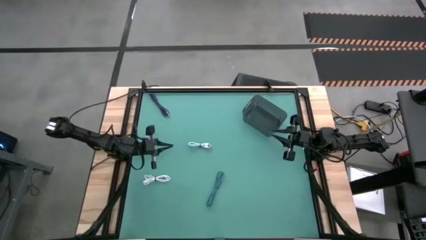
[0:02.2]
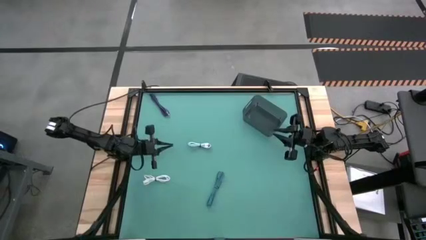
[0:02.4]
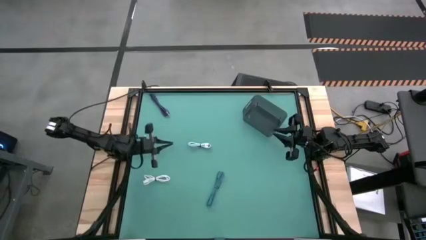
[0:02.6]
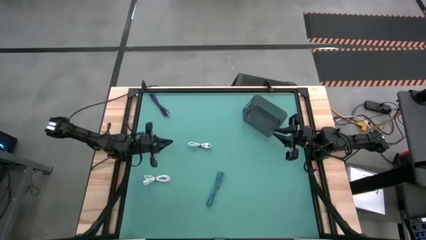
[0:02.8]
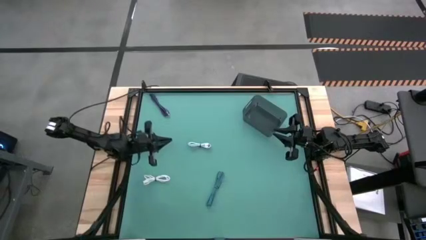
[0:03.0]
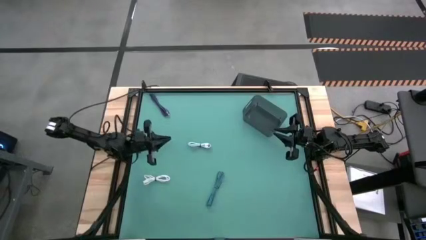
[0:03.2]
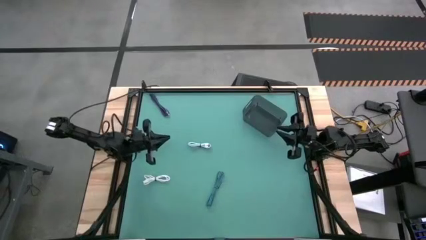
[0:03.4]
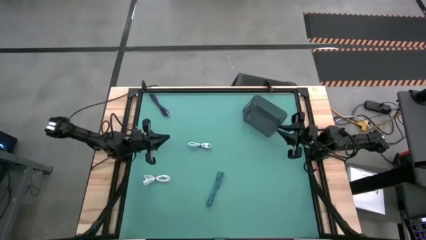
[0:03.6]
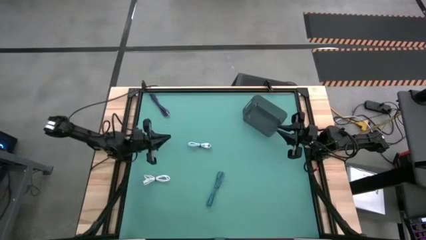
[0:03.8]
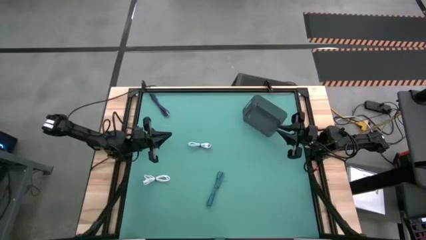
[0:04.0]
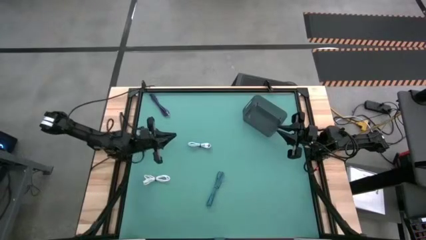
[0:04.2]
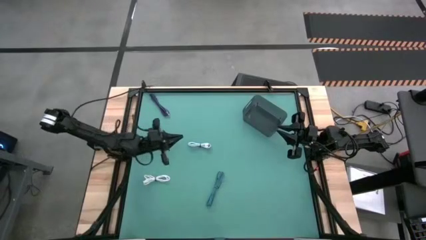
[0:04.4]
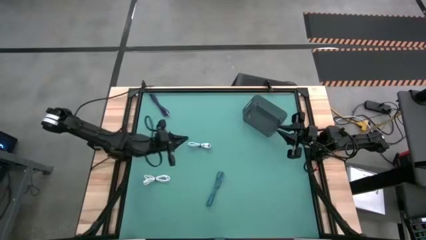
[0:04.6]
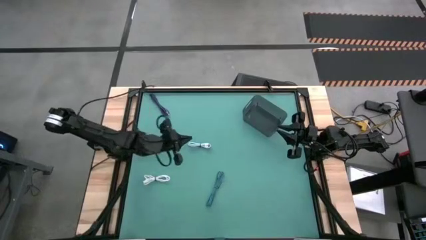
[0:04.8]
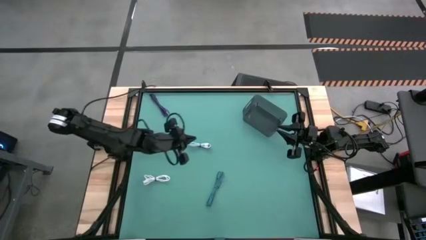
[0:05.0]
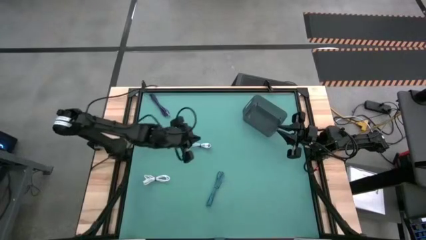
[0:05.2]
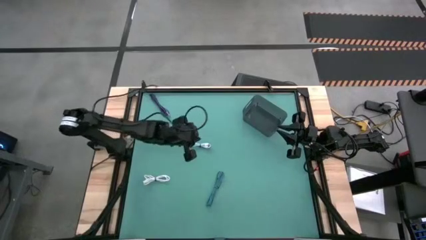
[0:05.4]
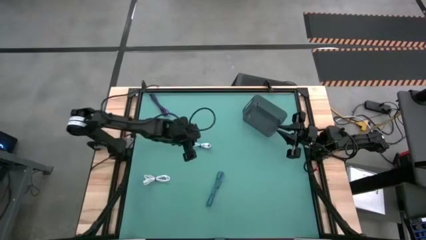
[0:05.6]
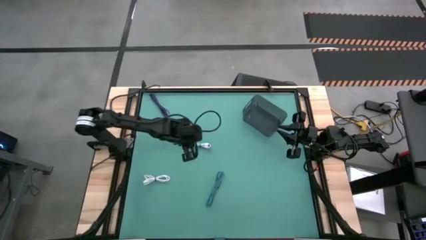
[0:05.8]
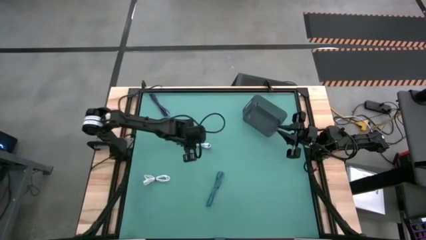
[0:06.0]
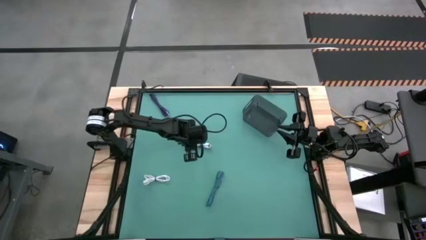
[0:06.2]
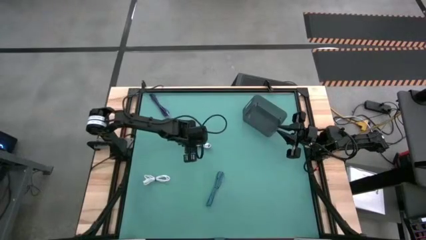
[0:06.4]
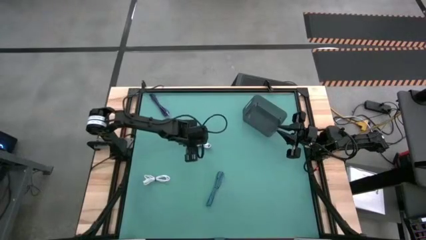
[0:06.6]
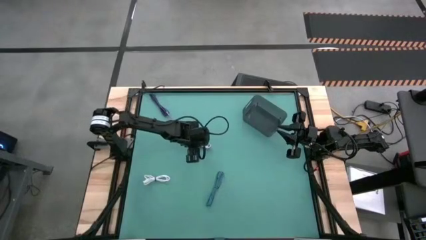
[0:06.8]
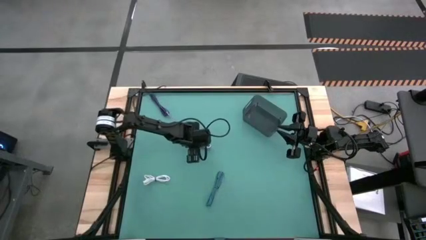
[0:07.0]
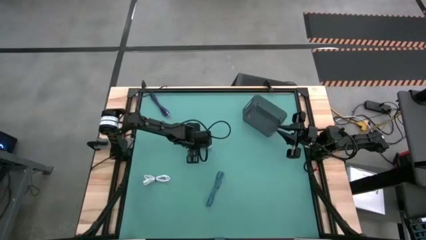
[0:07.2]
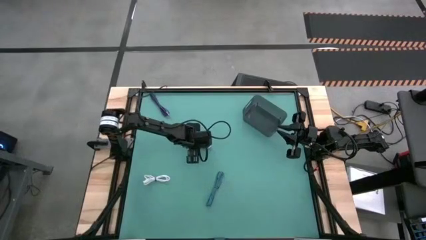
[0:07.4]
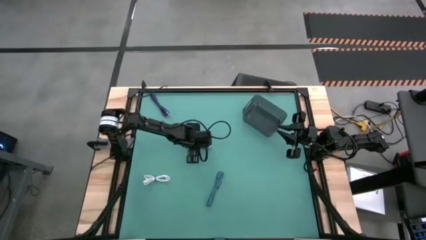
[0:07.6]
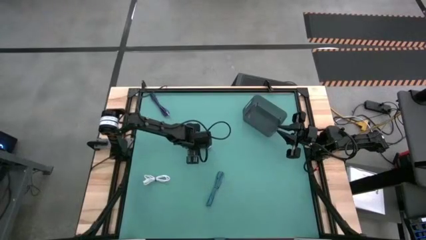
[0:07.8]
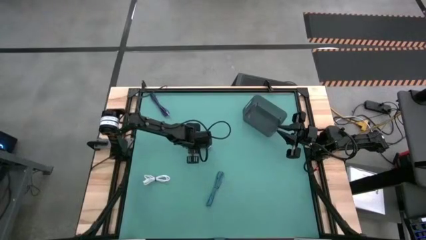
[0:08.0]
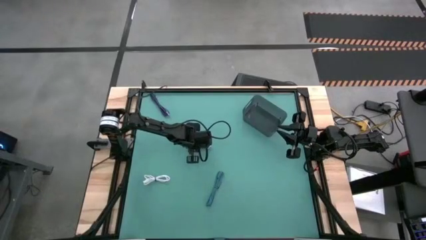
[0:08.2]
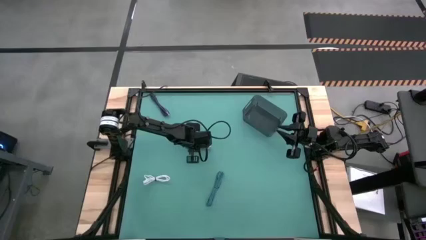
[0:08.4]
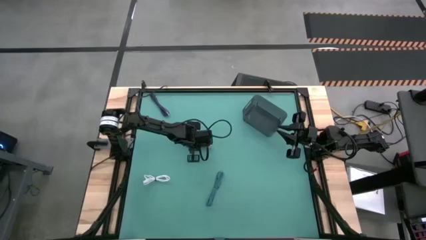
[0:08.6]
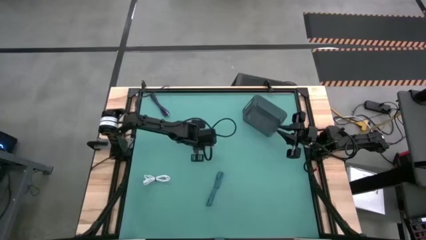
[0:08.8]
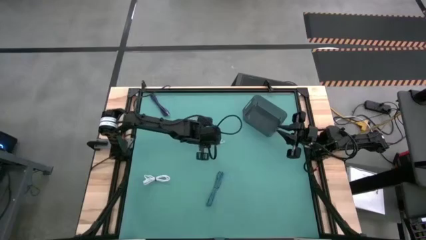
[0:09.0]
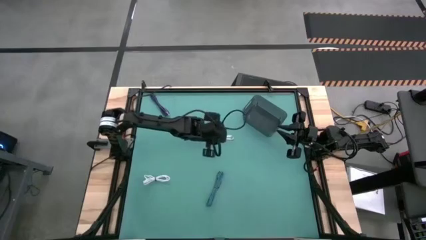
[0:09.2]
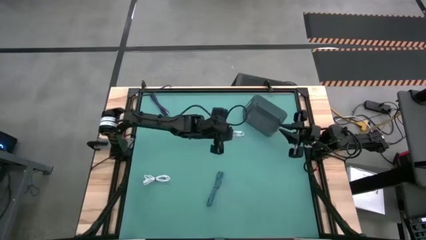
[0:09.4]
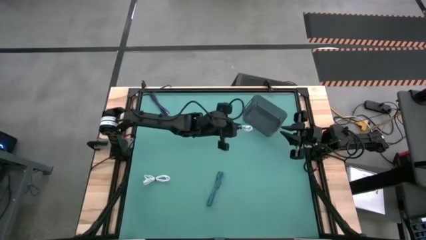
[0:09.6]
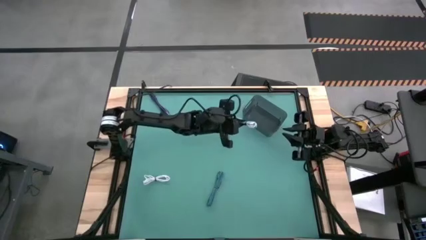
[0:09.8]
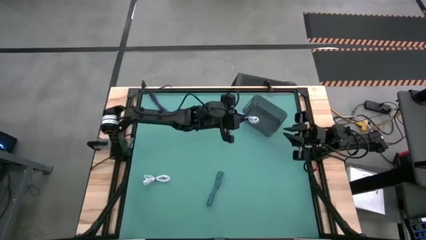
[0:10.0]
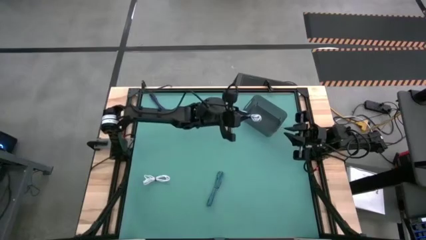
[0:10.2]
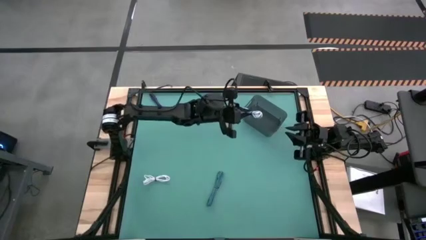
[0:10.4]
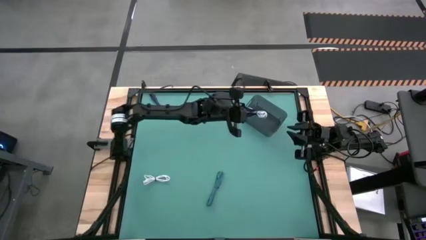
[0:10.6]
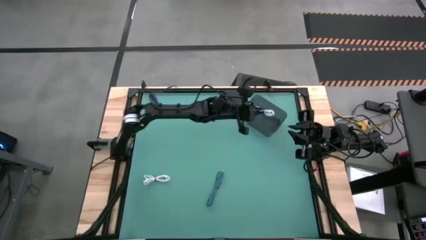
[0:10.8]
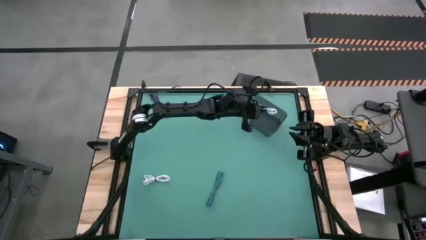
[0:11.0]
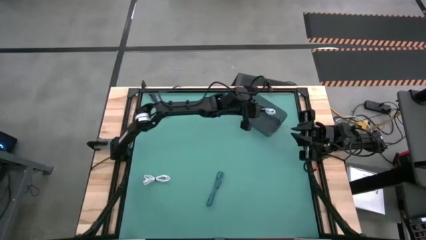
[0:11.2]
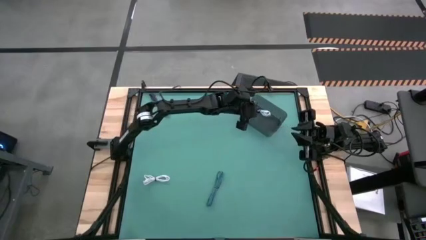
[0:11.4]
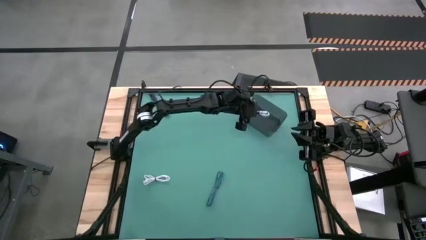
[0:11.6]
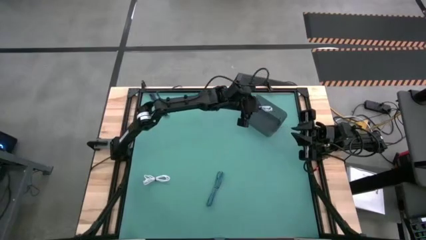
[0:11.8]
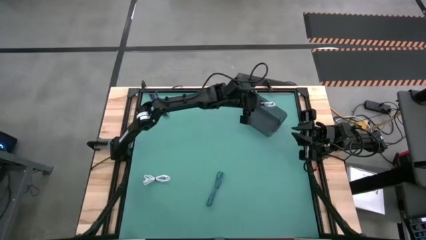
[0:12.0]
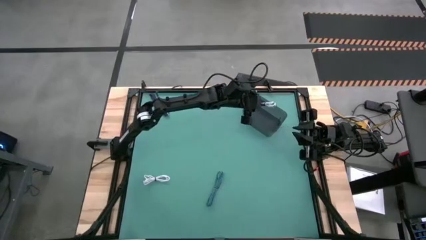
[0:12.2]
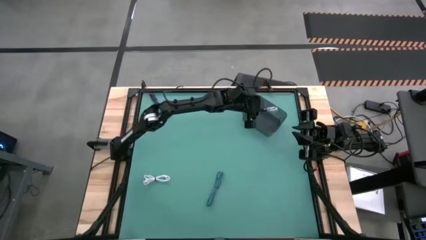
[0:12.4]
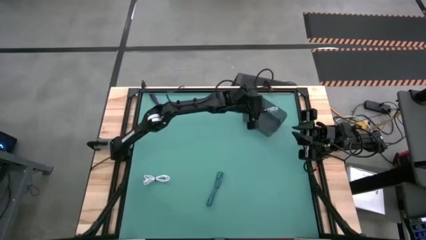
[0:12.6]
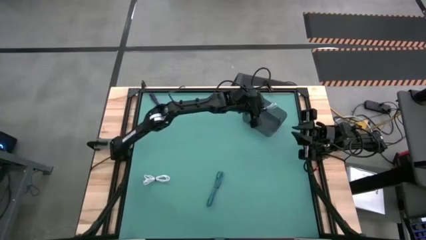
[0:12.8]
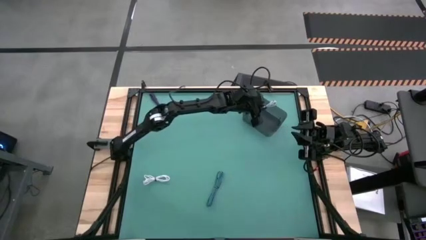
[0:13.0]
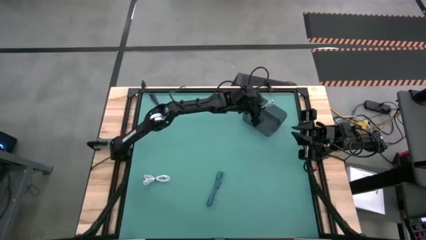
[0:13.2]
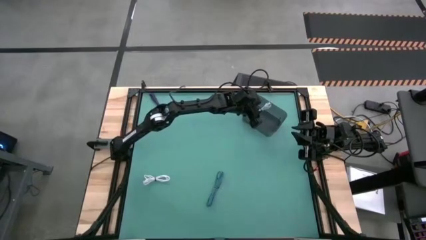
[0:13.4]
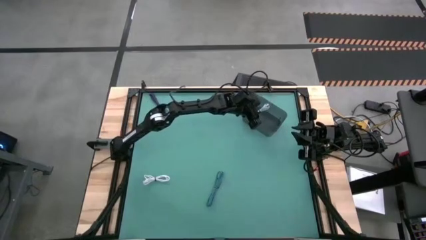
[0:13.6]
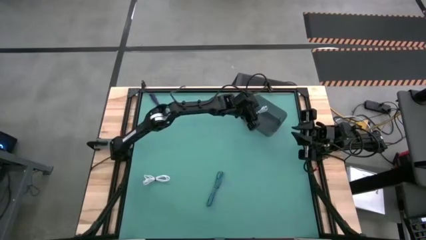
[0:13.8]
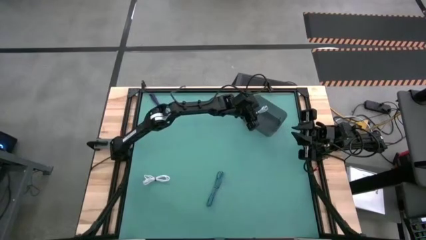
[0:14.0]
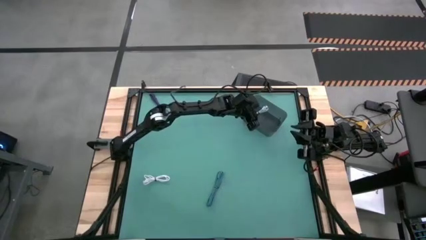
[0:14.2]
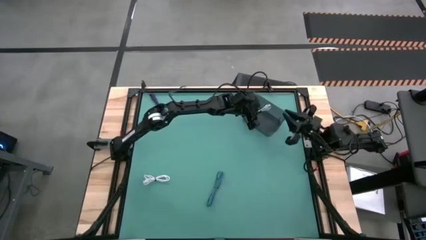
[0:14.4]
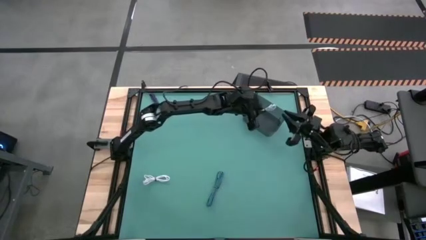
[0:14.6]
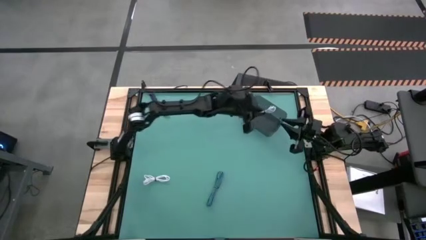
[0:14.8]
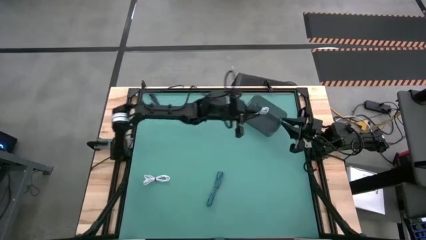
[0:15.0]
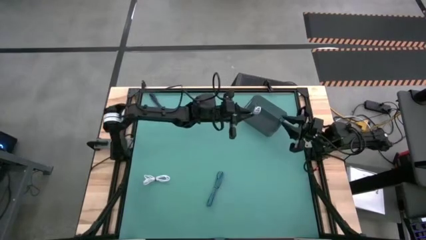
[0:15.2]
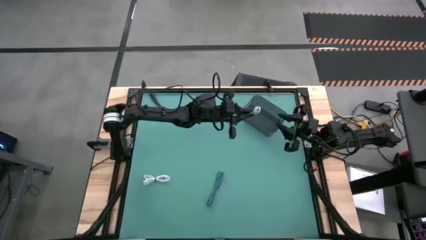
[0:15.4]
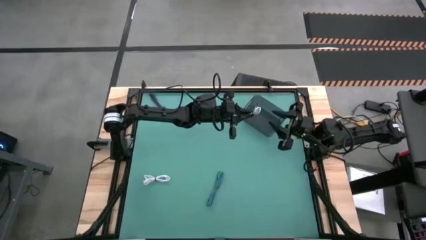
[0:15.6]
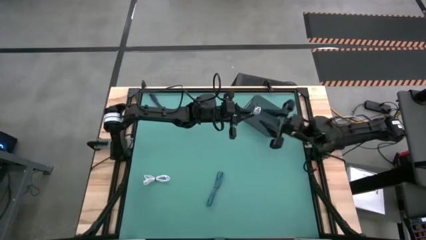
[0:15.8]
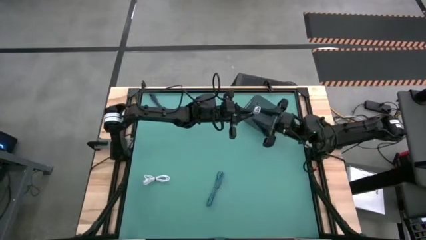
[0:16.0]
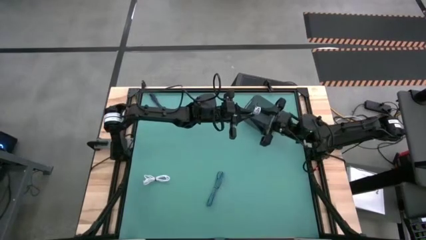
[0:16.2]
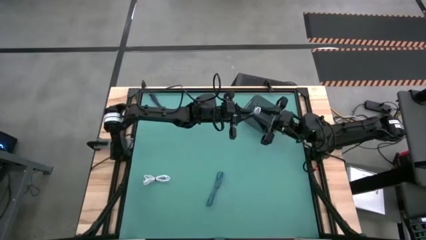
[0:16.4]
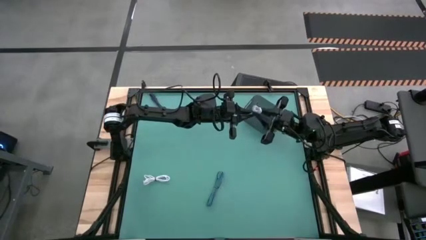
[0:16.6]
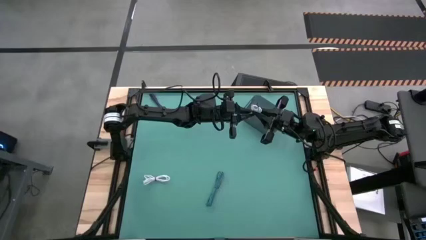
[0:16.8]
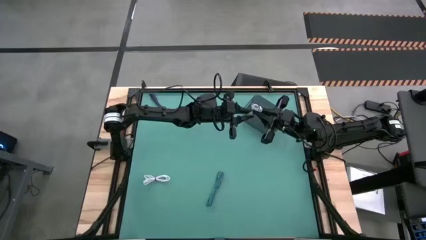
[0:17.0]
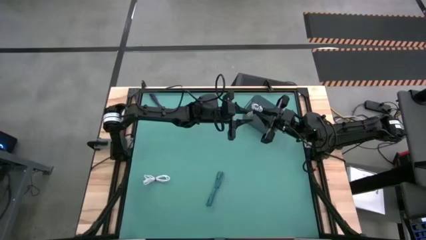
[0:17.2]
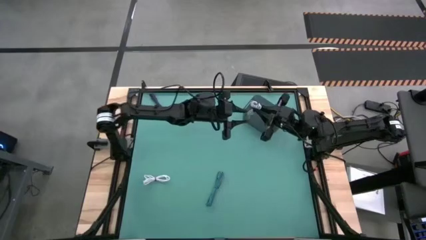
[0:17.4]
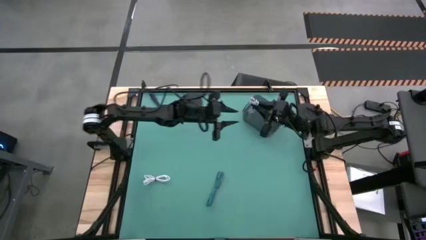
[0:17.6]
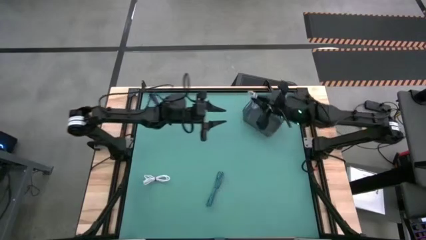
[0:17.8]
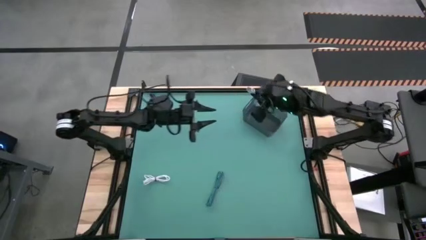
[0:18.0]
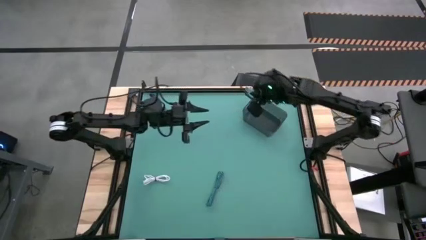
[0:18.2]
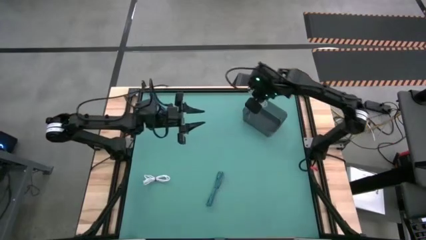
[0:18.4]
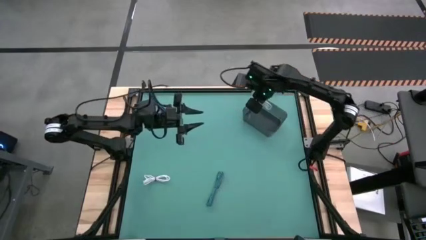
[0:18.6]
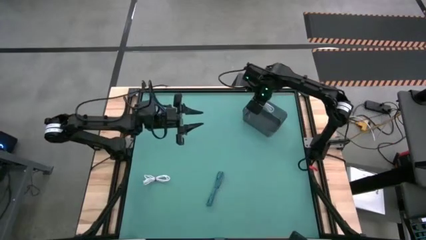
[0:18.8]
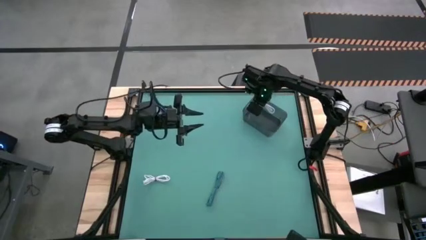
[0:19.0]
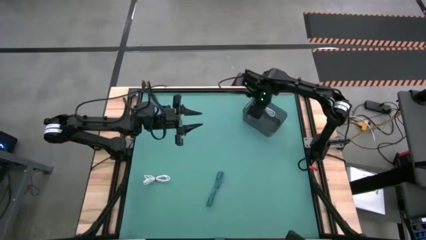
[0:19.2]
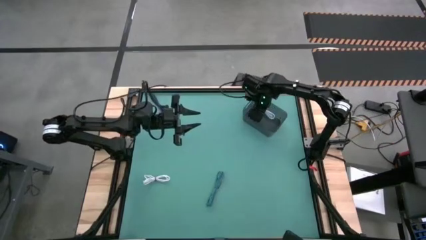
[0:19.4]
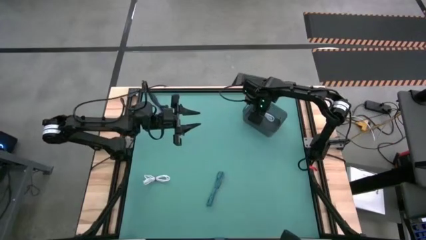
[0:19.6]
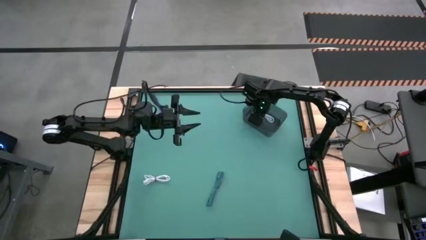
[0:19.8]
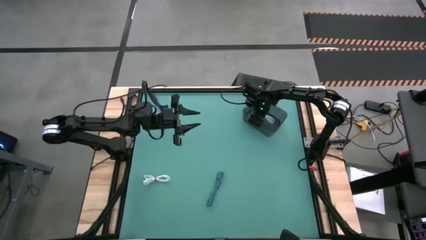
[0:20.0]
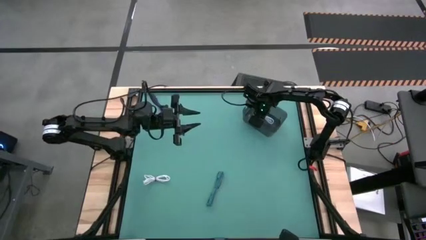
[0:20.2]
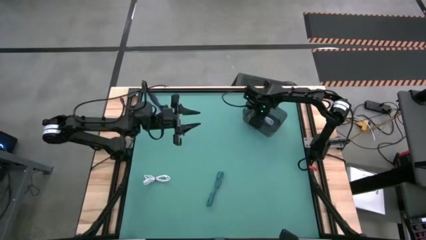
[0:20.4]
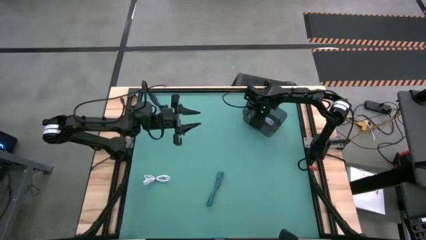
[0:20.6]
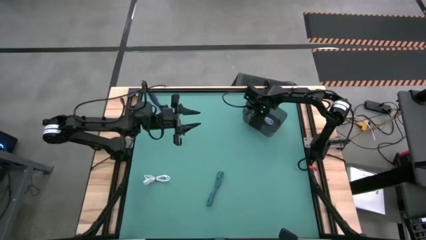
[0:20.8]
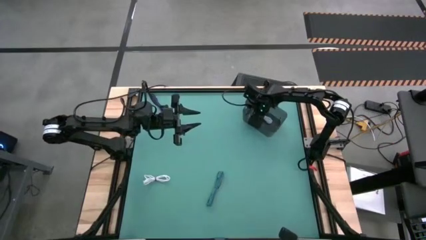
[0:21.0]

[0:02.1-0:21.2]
Task: Pick and place USB-C Cables
Put the light blue charger cable into the black container
